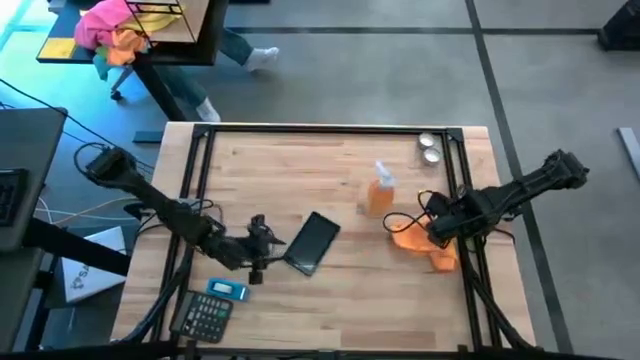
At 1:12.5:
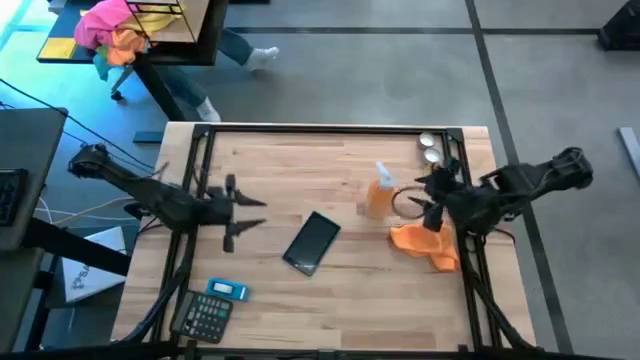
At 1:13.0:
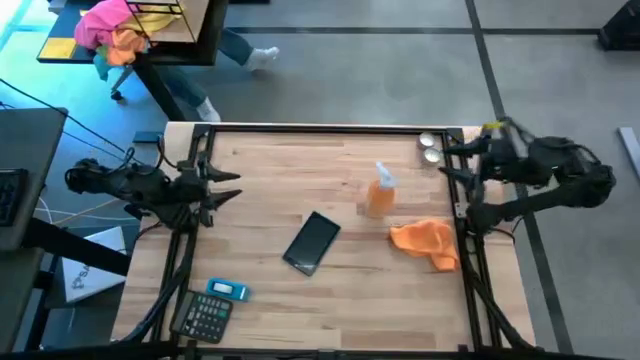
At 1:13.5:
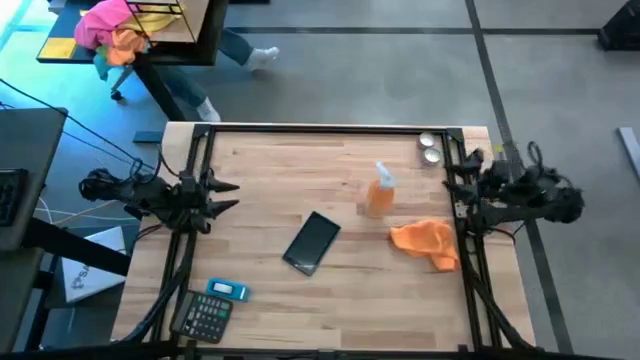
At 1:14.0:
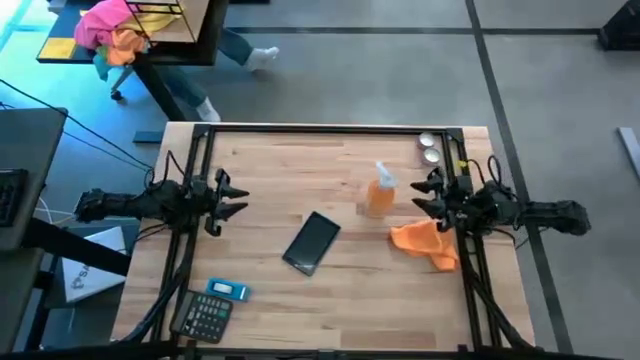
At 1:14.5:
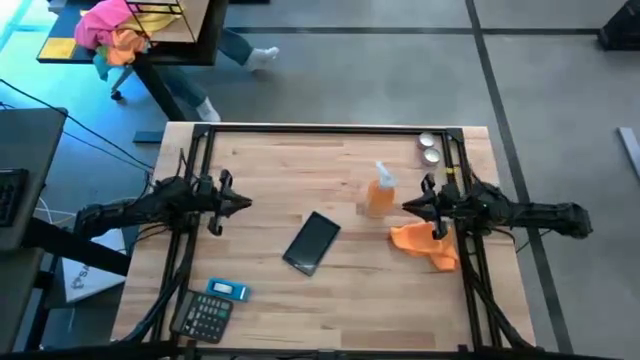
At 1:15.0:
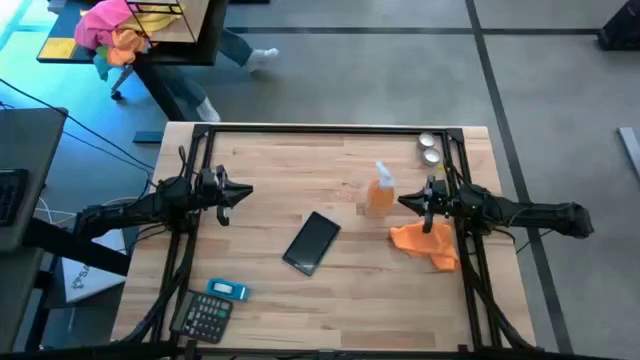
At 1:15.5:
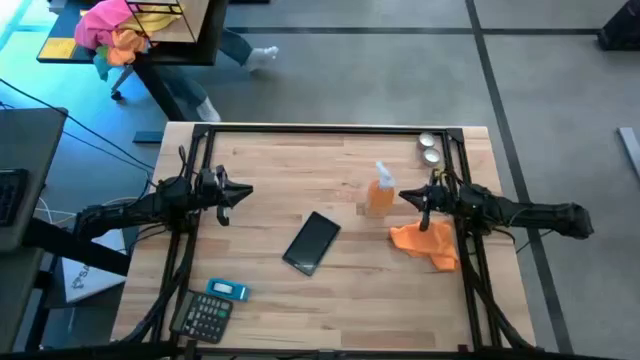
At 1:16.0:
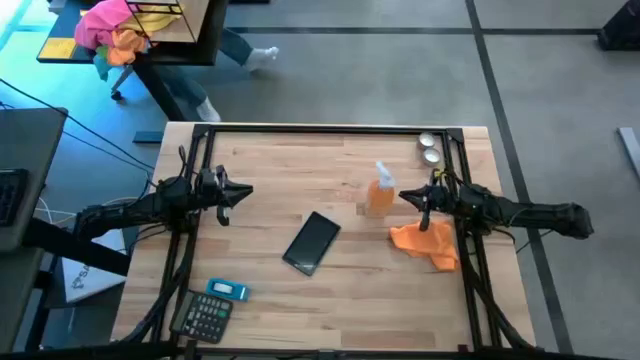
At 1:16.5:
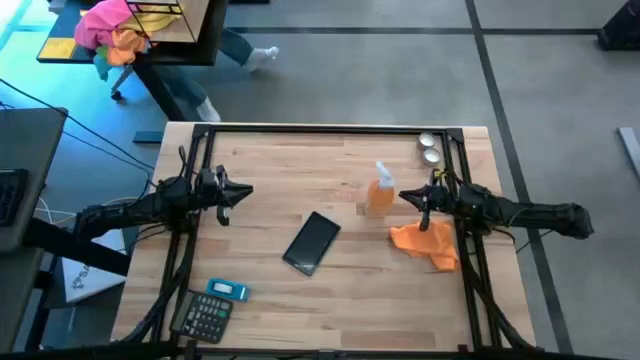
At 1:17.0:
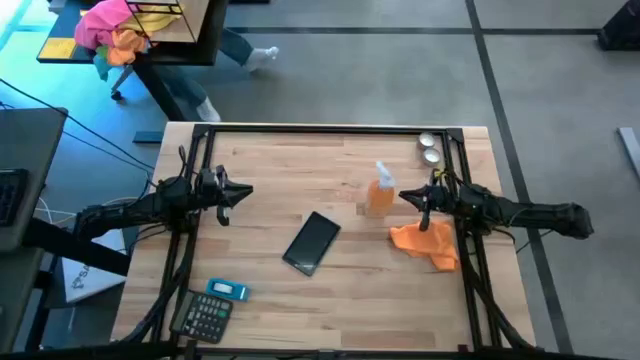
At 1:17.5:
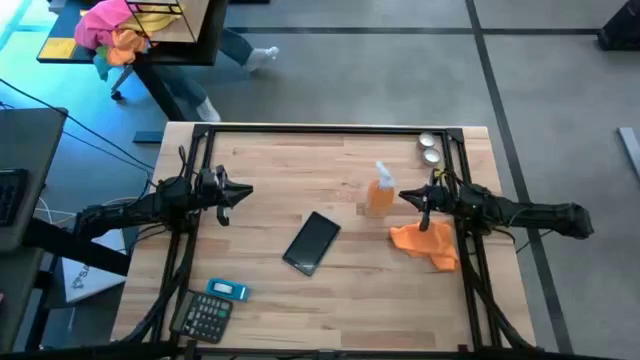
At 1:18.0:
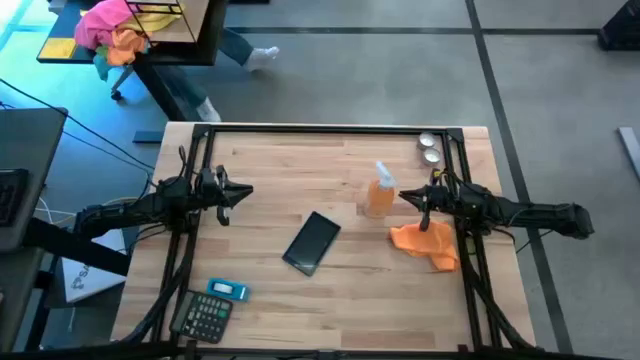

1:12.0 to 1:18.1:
Task: Apply microfiber cloth
Return to Home Position

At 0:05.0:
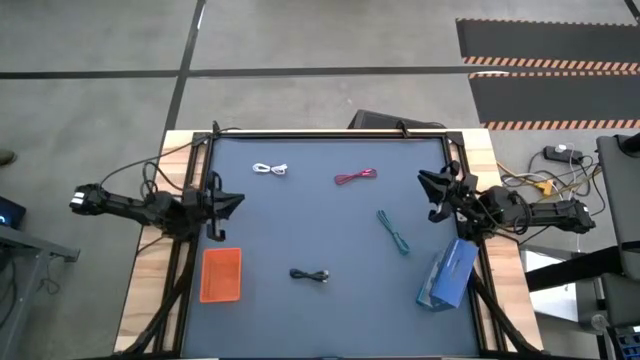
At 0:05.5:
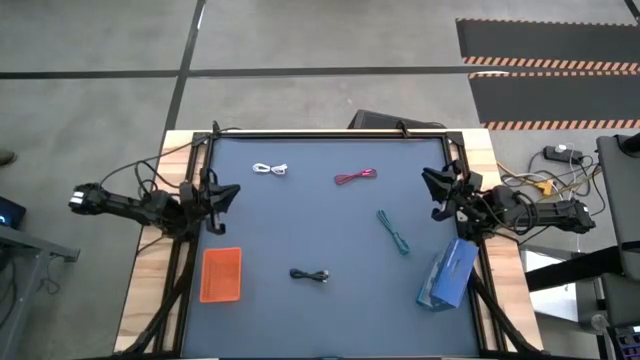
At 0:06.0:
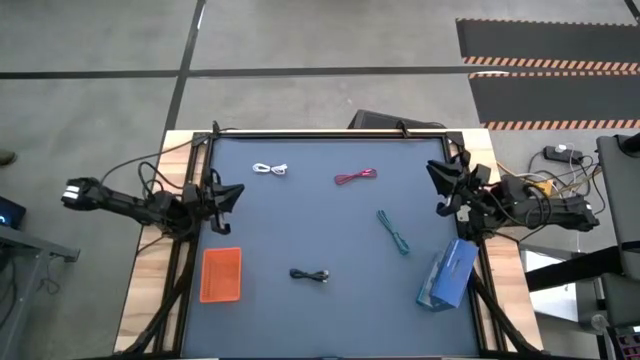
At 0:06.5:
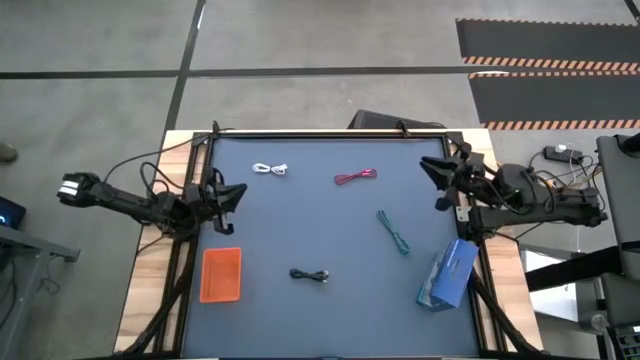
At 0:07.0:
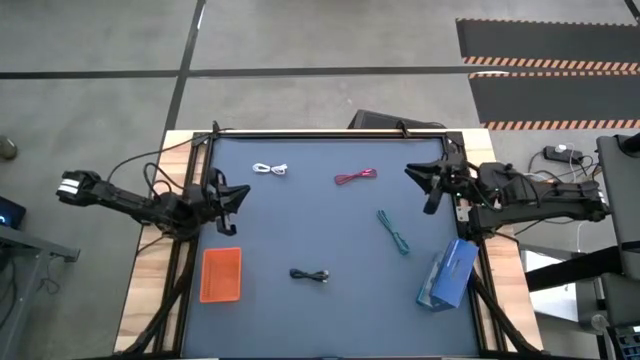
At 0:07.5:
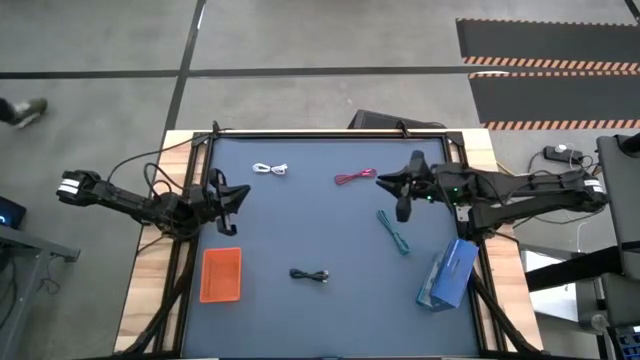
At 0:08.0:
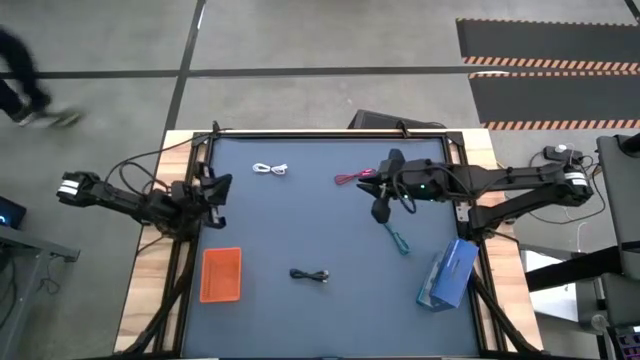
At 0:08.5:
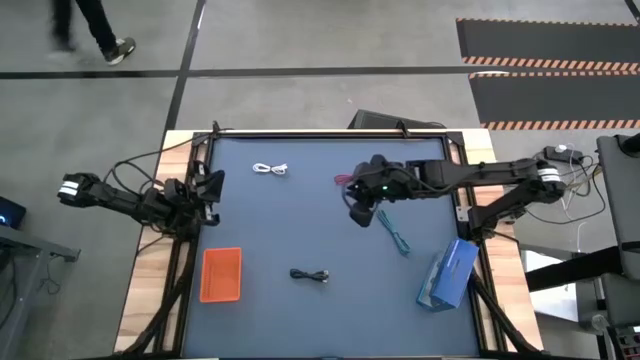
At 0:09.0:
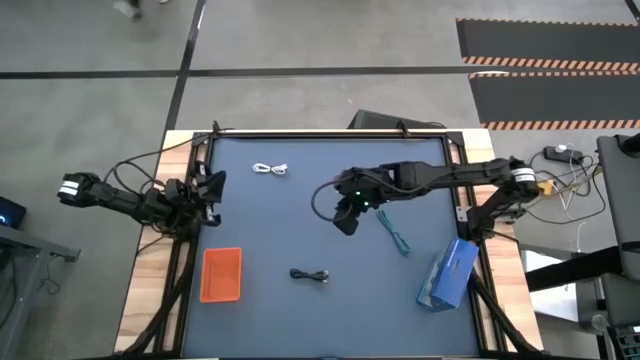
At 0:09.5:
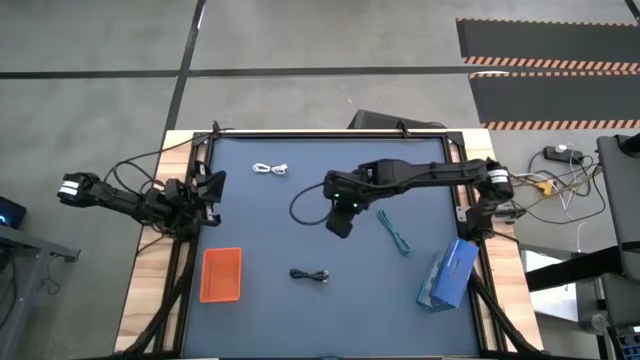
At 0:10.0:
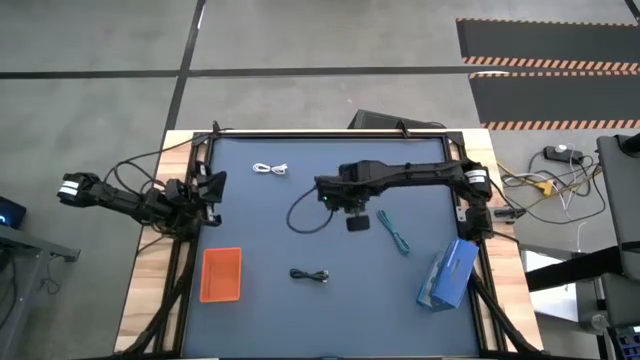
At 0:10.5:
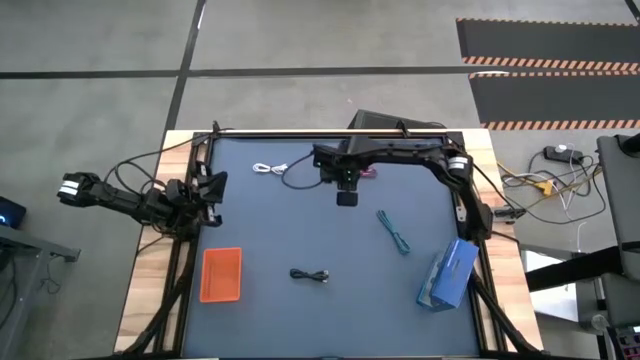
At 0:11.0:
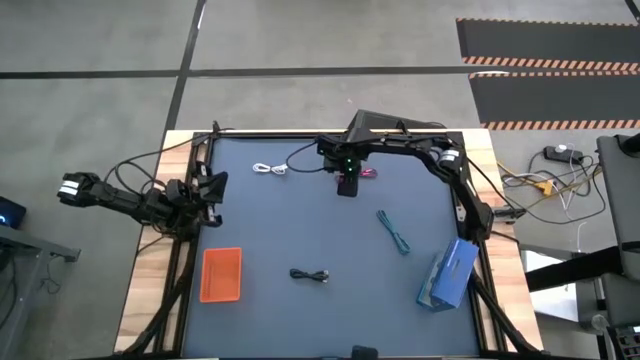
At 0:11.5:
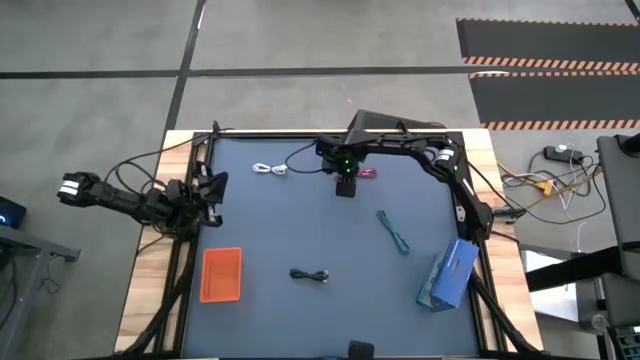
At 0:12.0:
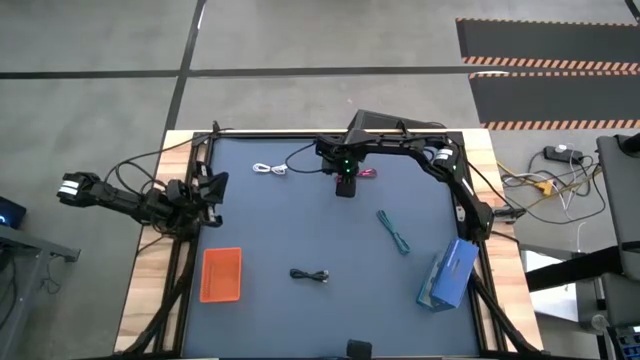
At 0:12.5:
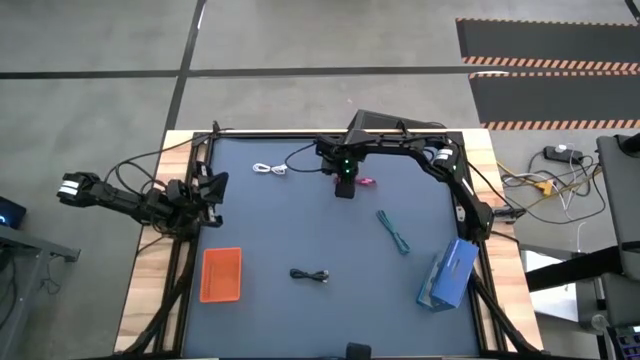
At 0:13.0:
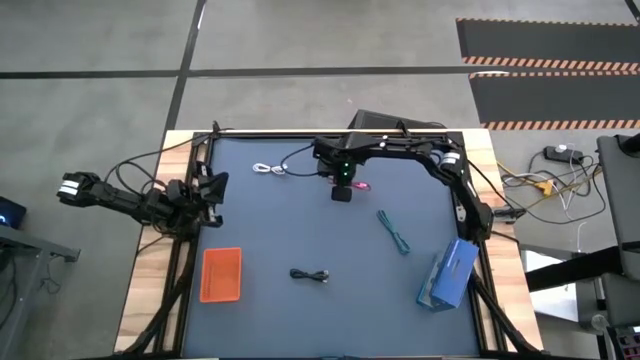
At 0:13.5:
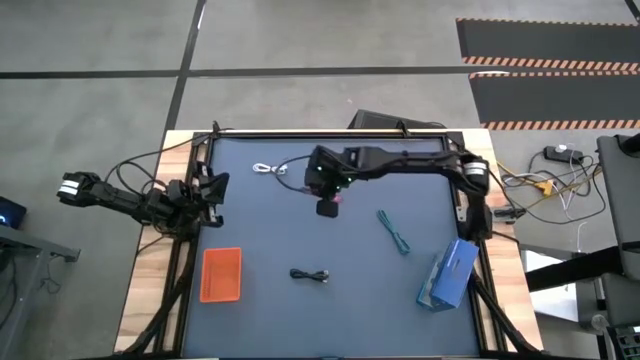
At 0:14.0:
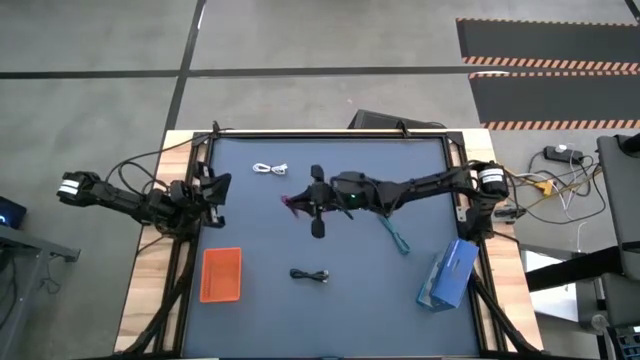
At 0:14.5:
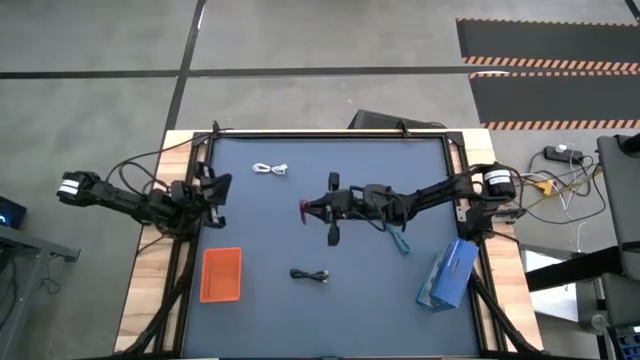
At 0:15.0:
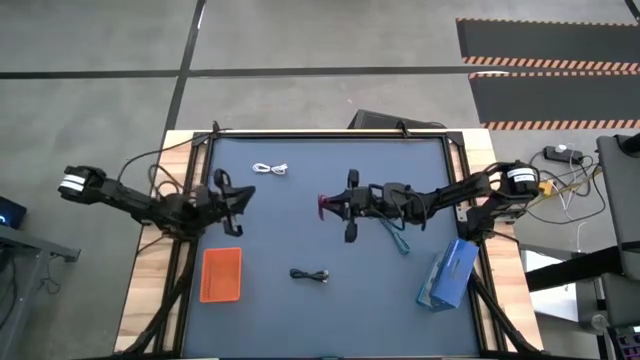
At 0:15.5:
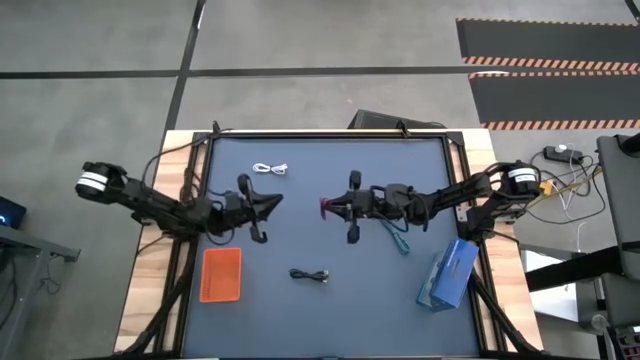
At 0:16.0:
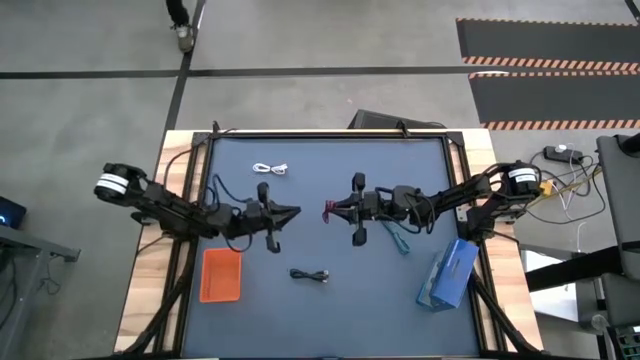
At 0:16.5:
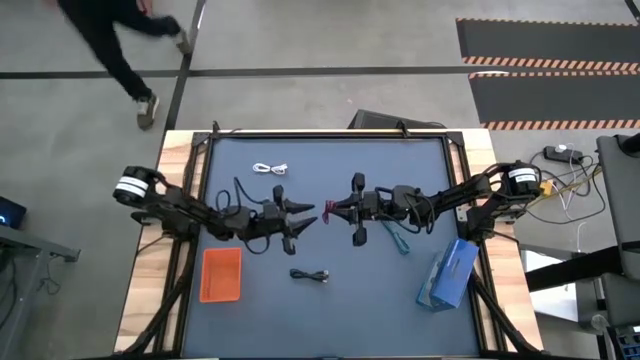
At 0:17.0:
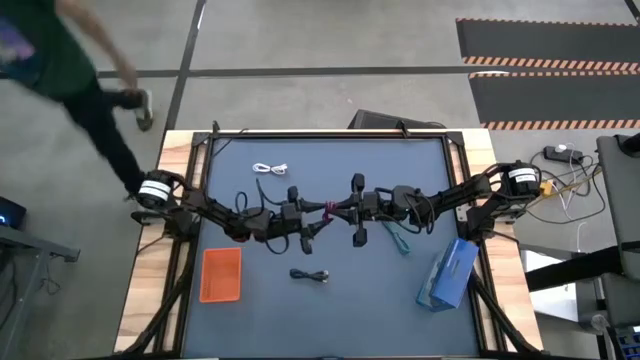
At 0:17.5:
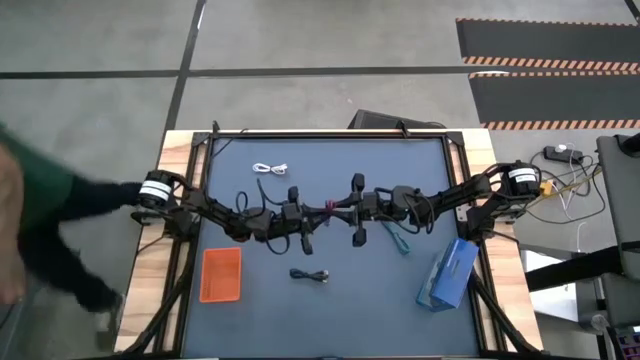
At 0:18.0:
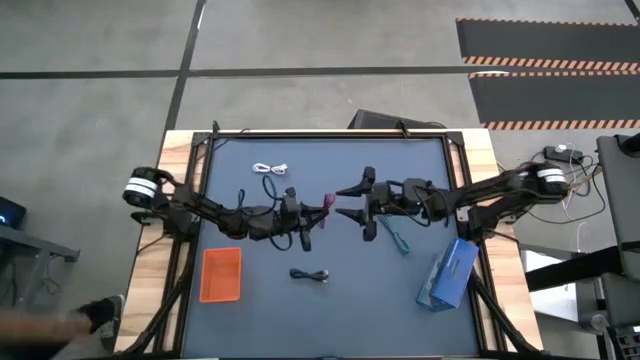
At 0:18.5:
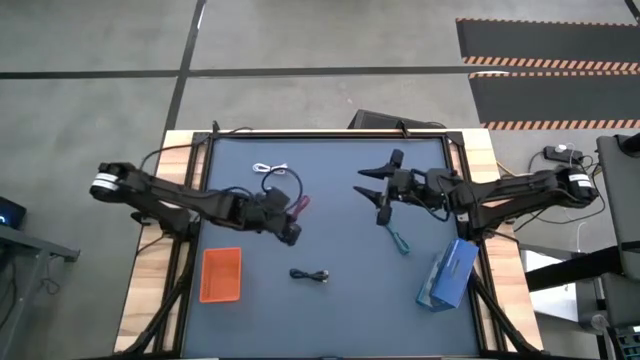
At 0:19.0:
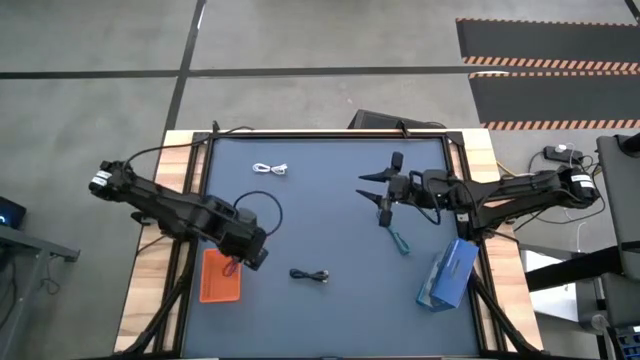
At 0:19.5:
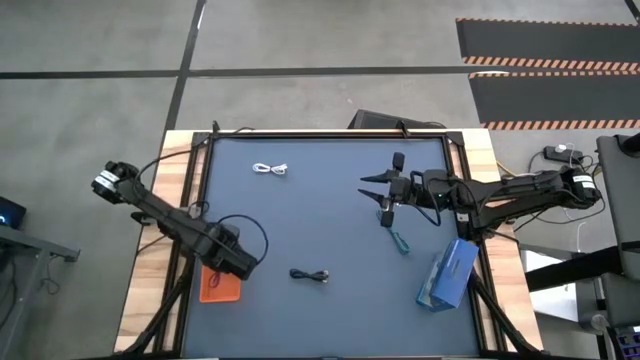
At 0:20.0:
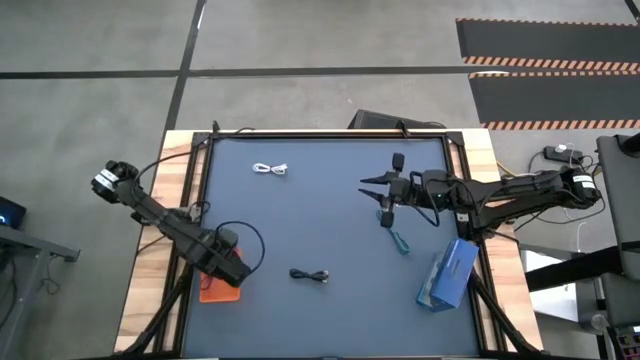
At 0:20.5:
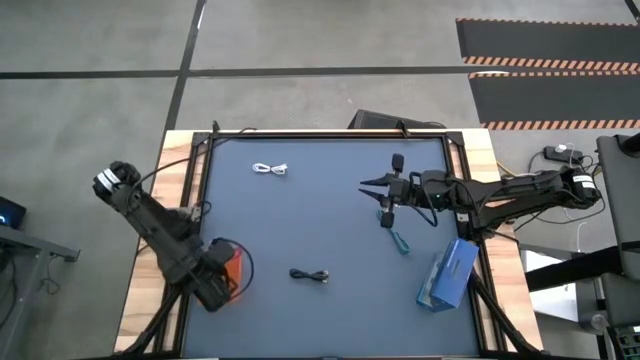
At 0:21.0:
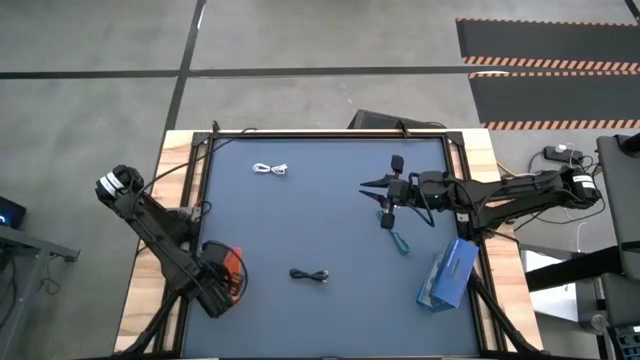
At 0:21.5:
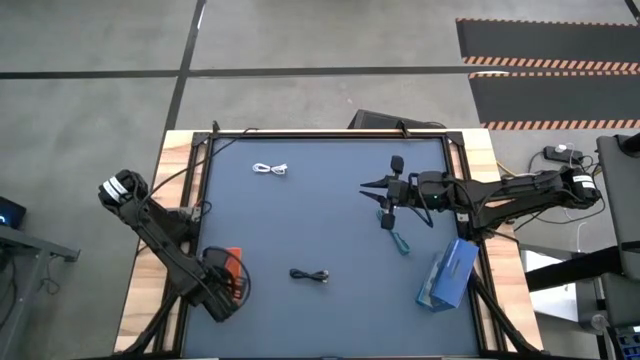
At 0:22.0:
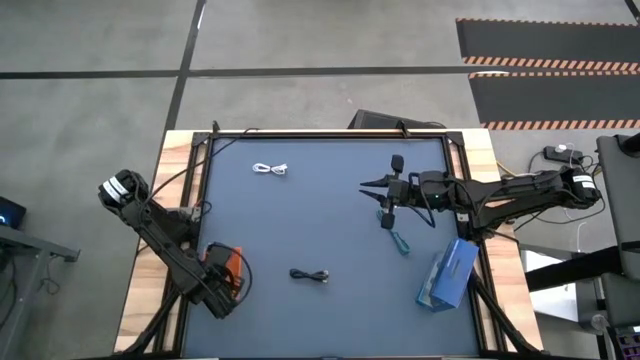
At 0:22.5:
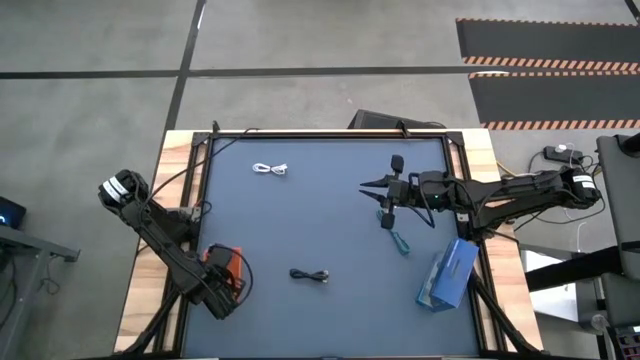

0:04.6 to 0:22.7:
Task: Pick and place USB-C Cables
Put the red charger cable into the orange bin
